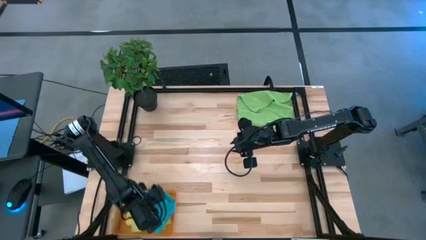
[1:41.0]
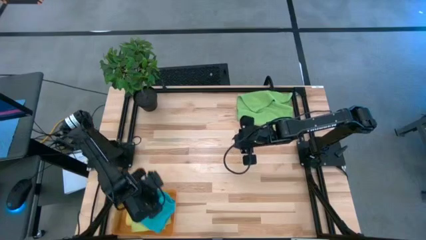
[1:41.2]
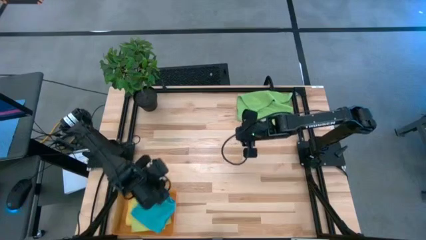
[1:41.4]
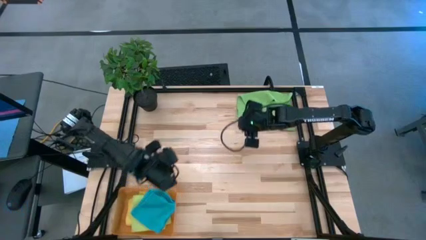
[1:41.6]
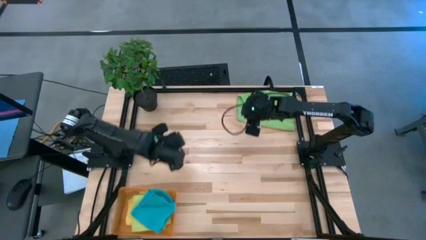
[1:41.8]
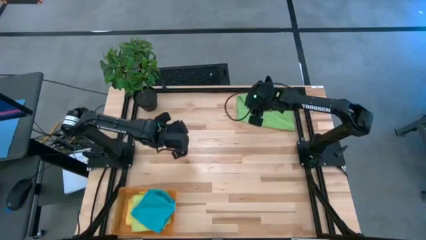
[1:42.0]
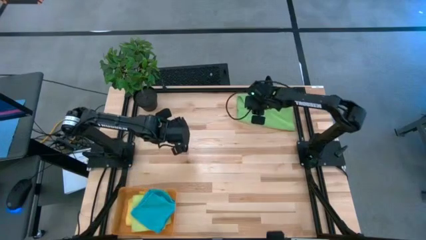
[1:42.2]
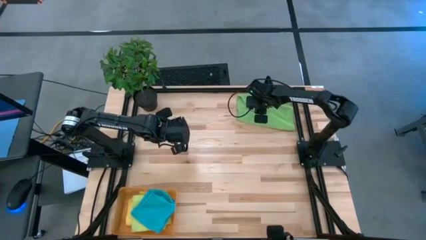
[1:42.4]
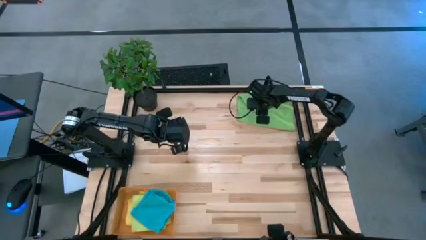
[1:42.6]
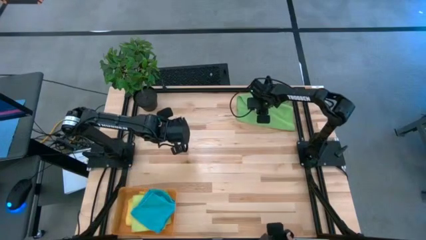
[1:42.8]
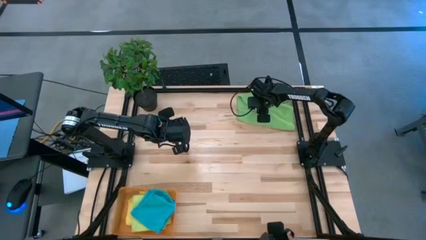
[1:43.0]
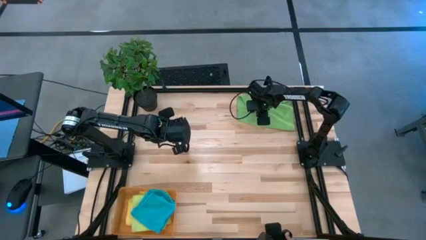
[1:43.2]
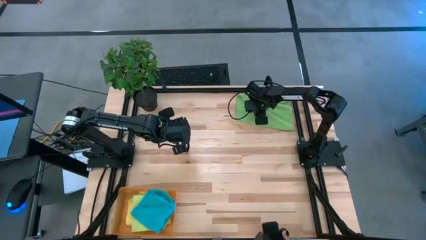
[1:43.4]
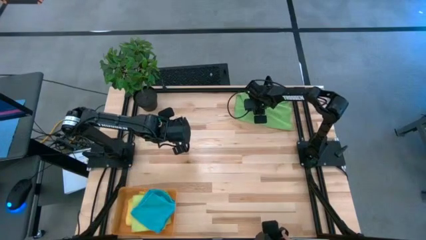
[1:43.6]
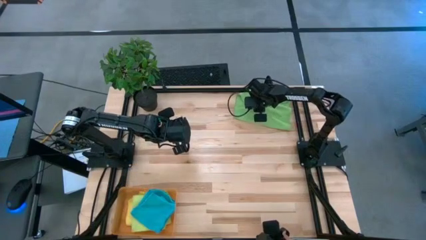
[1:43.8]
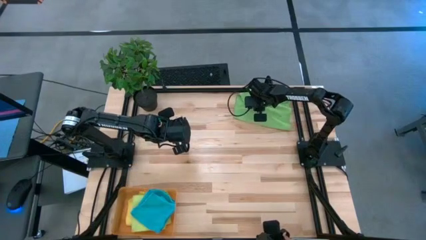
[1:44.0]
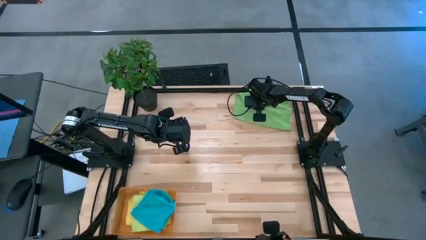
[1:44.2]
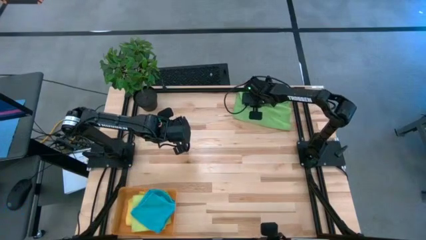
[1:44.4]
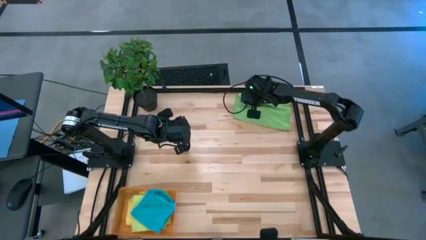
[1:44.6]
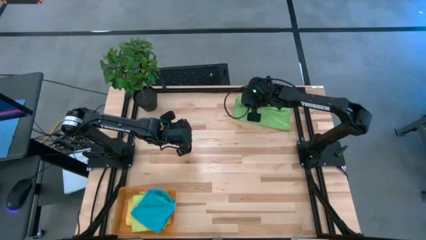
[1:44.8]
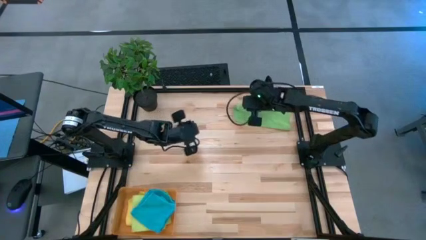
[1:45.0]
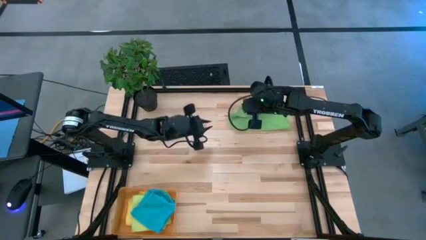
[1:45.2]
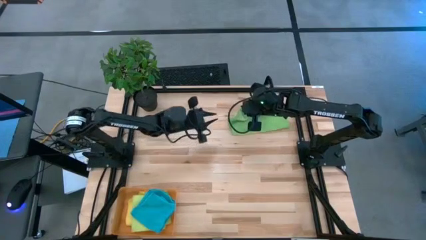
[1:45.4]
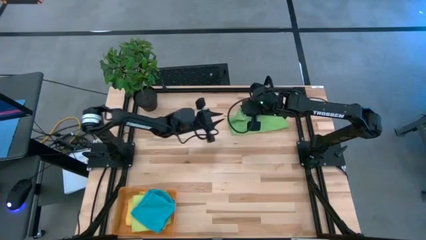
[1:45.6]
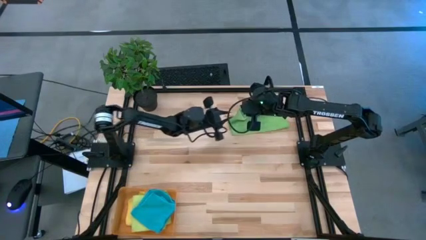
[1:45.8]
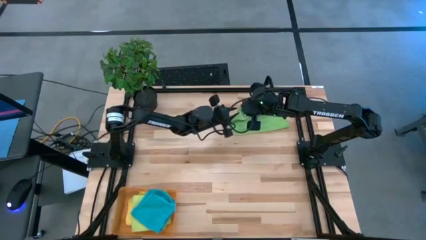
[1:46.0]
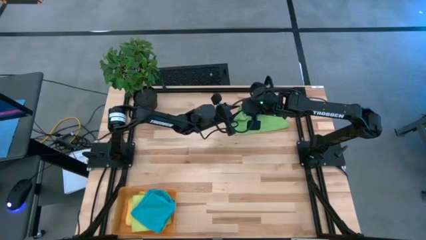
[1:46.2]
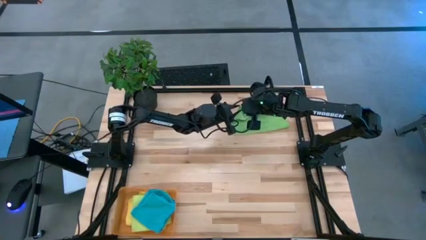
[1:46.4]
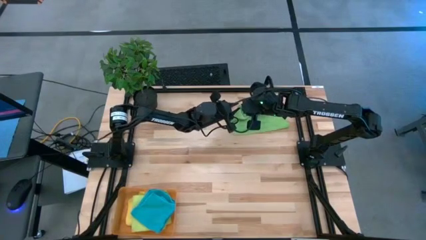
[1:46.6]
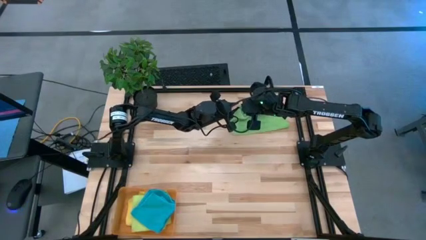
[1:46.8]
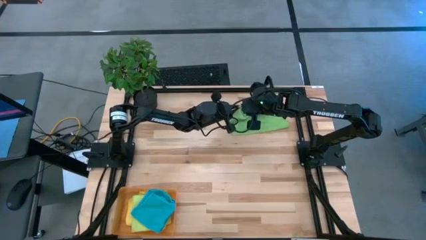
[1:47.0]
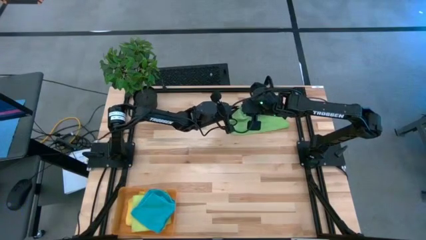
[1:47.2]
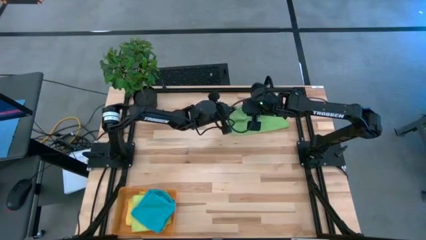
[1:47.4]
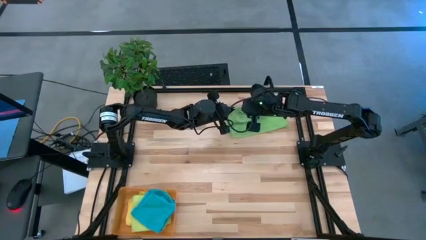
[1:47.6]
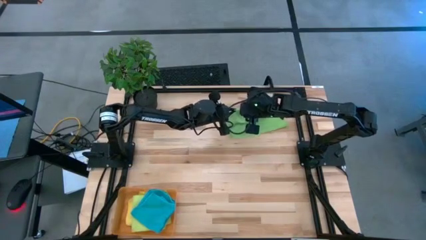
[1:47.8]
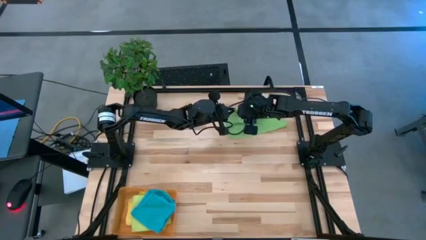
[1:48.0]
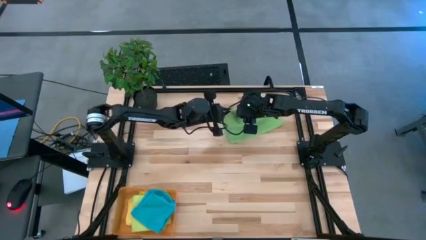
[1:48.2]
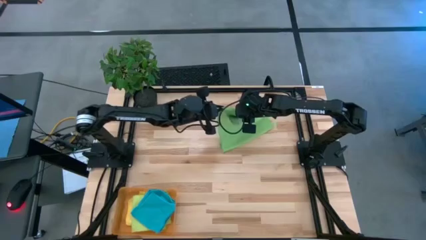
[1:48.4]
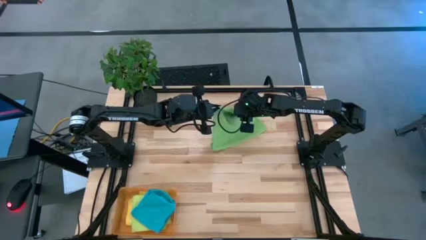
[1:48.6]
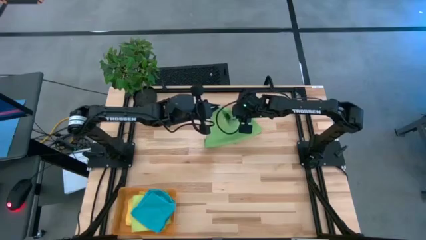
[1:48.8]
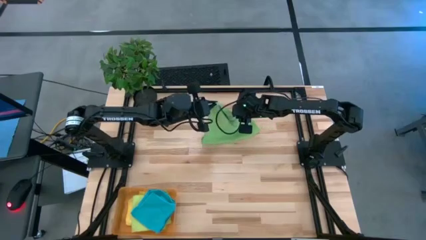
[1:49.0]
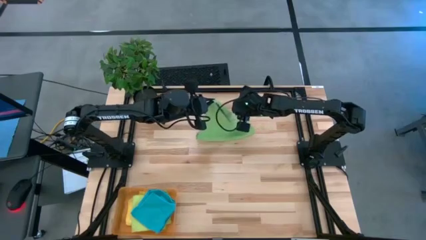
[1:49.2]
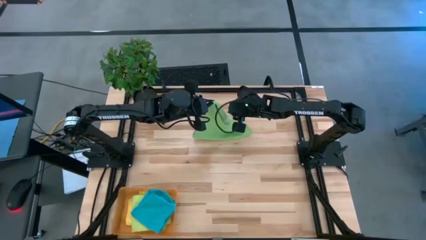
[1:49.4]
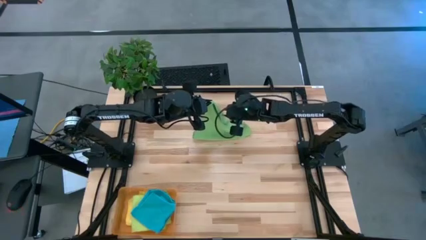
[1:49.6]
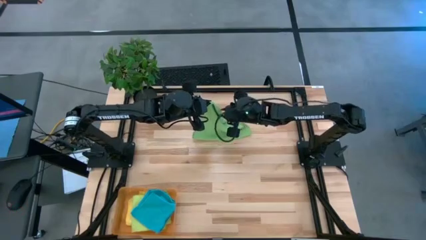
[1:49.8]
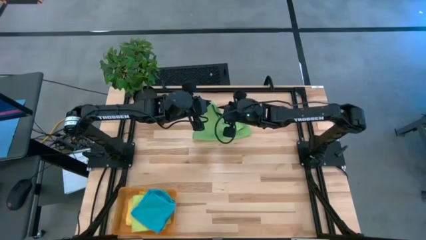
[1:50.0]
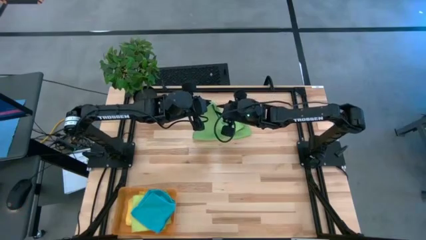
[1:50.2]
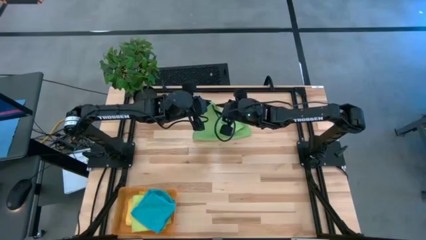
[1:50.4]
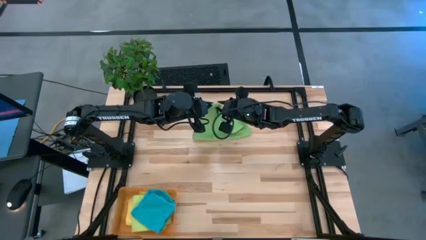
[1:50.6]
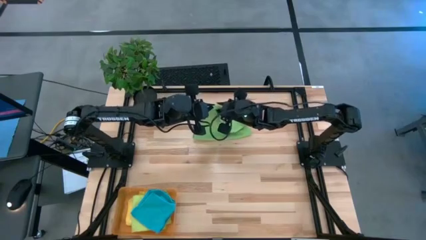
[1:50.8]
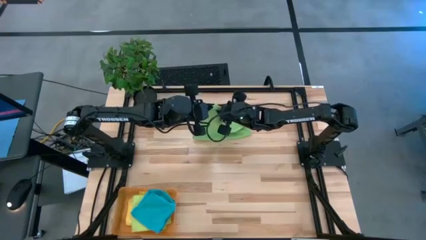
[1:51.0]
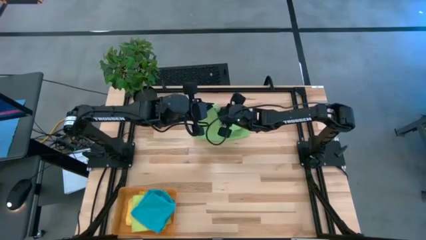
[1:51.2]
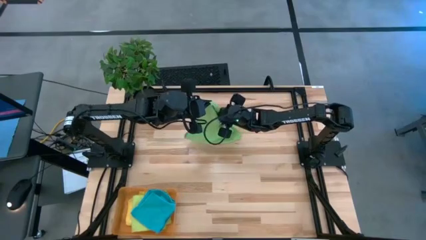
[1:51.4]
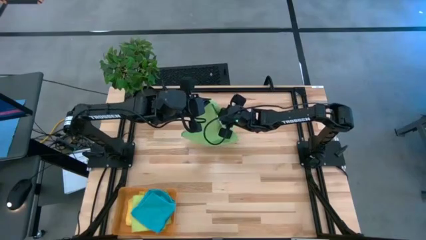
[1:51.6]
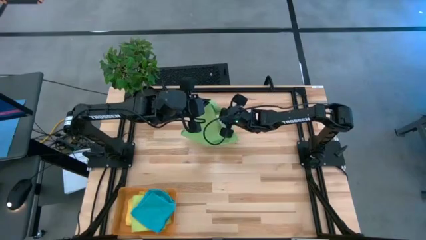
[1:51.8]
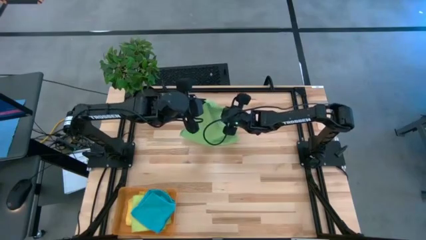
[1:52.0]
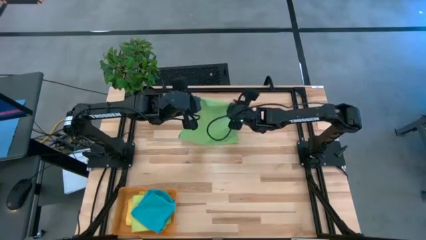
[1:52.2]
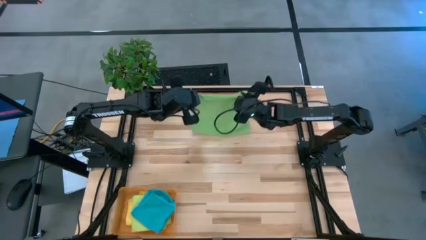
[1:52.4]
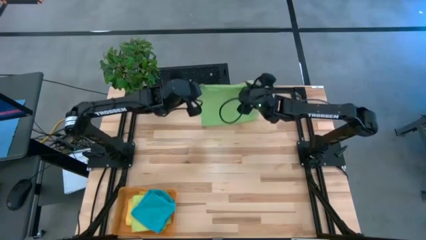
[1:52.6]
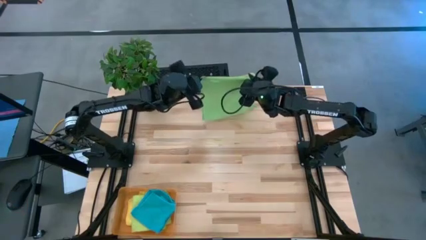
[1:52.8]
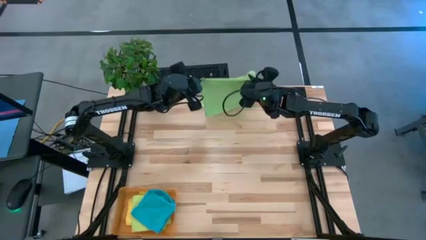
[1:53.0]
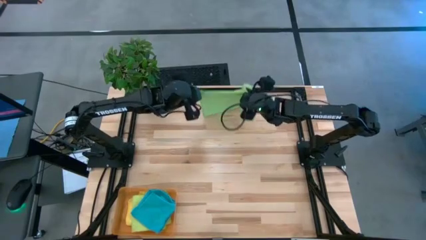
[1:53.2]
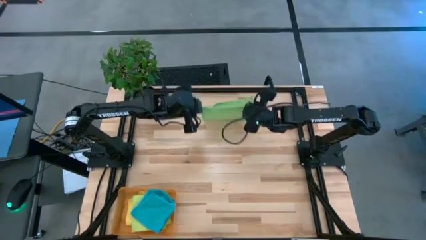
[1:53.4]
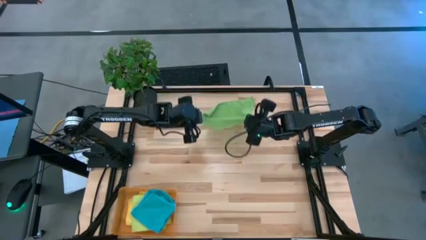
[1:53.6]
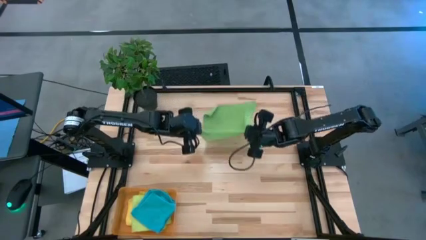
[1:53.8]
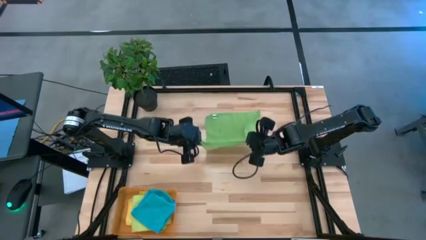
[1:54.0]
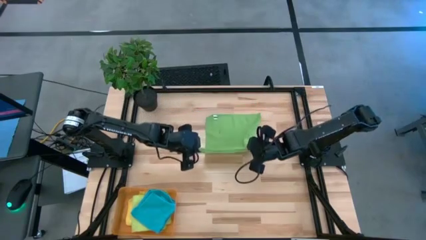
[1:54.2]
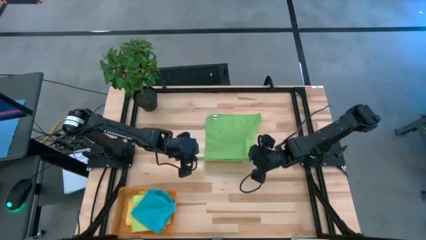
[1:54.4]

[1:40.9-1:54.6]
Task: Fold microfiber towels
Fold the green towel

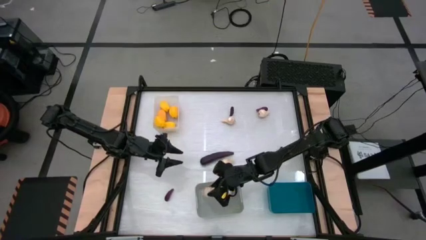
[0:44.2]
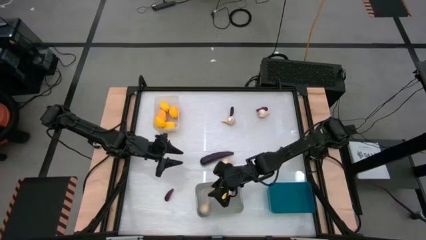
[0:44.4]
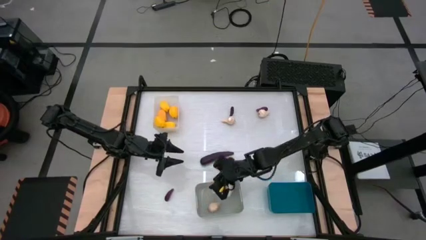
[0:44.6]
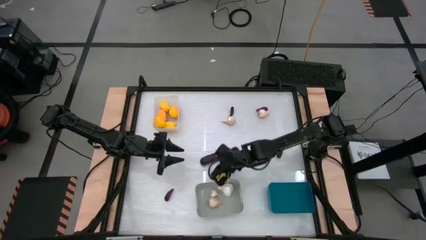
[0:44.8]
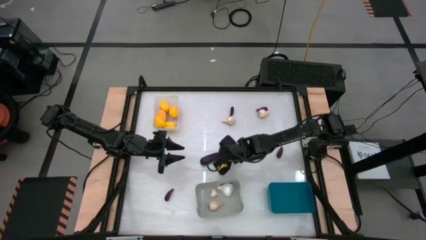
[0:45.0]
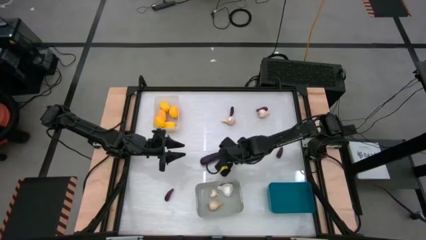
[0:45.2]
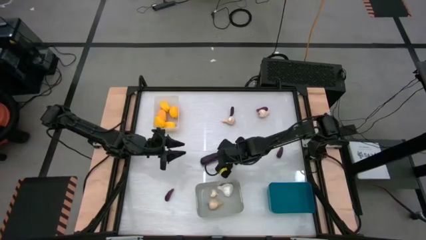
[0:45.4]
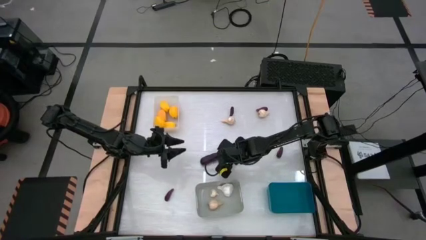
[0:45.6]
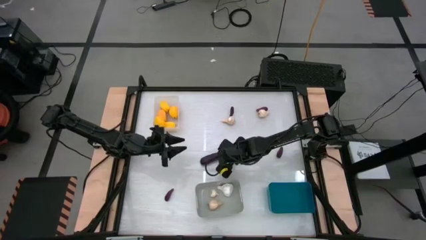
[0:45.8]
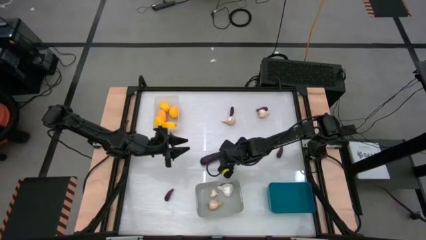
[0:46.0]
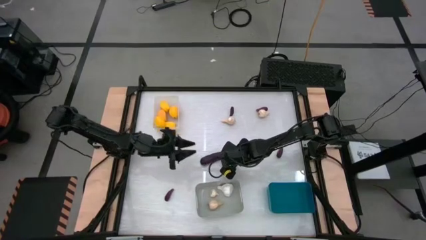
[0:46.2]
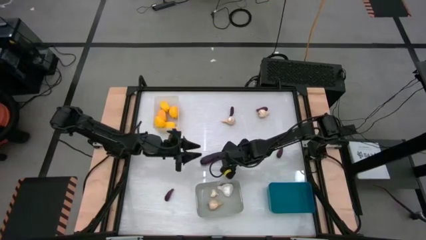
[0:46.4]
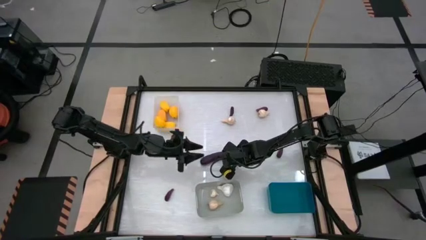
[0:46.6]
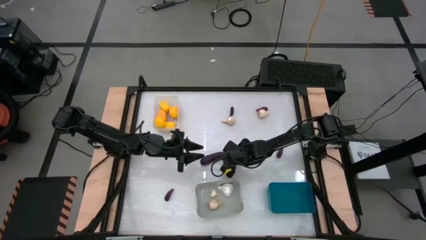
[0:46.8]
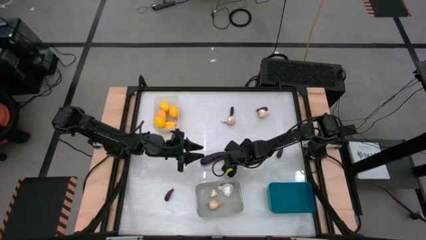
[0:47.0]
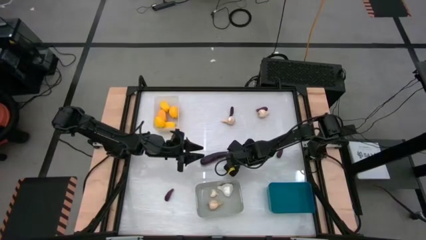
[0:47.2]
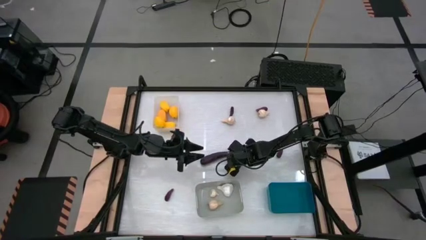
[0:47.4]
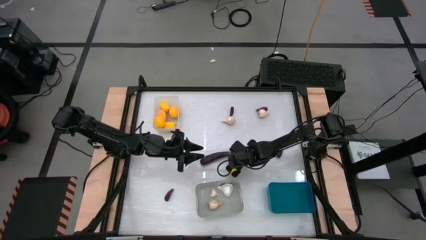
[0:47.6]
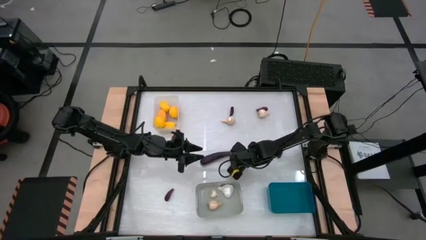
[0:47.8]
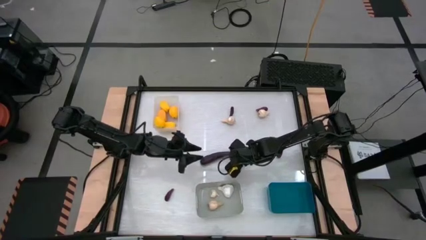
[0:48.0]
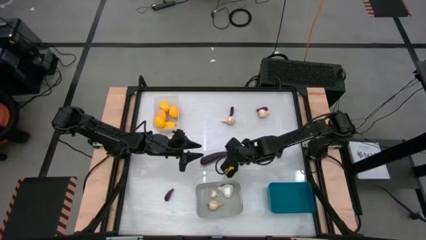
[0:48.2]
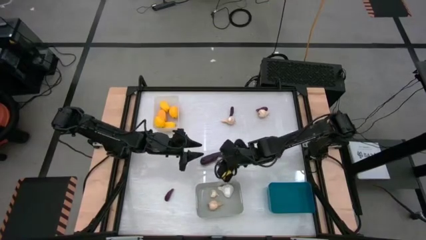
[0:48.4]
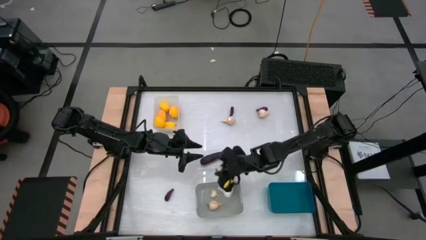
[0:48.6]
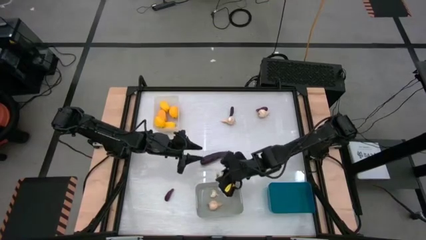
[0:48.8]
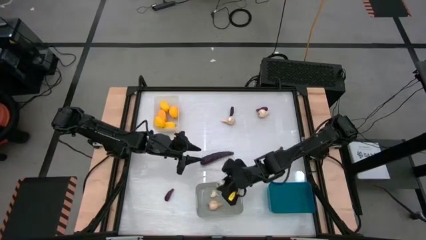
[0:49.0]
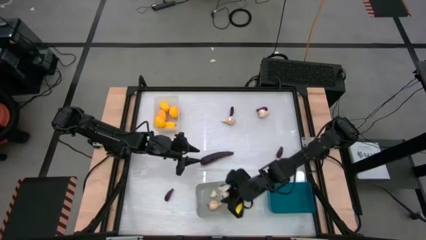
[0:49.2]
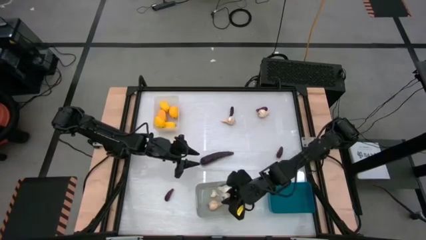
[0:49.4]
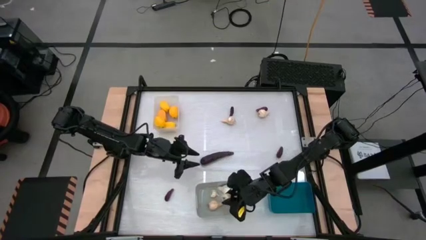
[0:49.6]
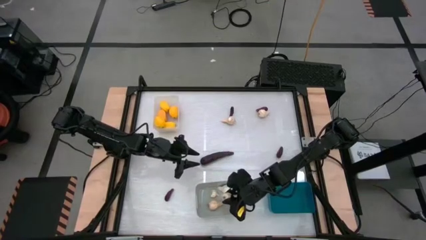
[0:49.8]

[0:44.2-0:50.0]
Task: Sort produce into baskets
Put the garlic into the gray bin
